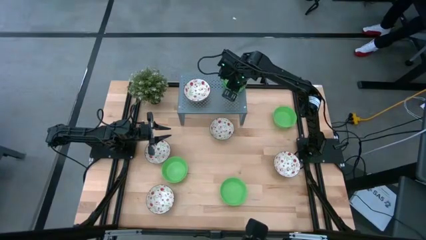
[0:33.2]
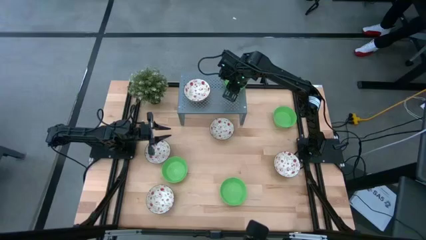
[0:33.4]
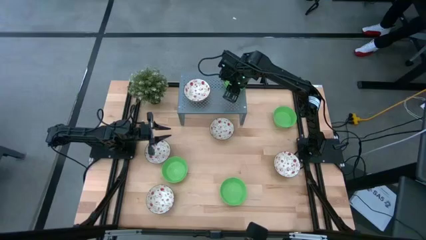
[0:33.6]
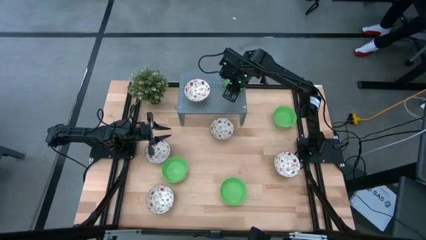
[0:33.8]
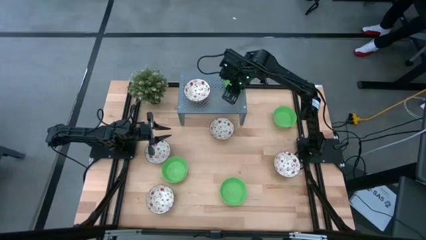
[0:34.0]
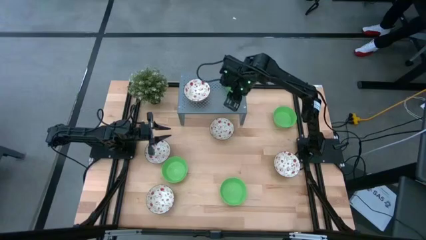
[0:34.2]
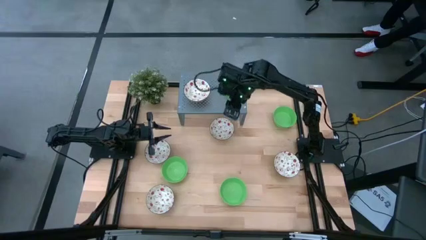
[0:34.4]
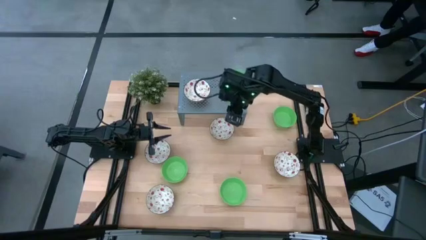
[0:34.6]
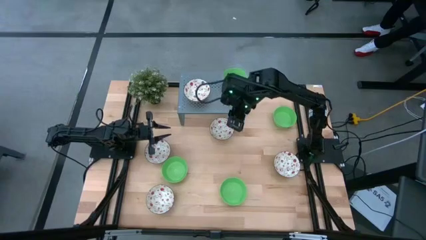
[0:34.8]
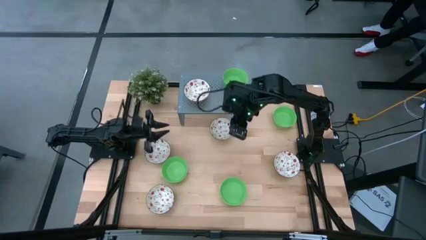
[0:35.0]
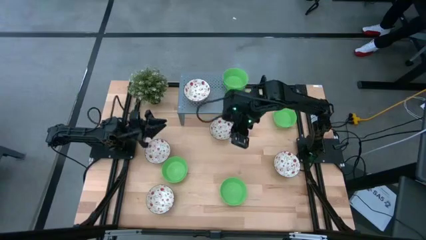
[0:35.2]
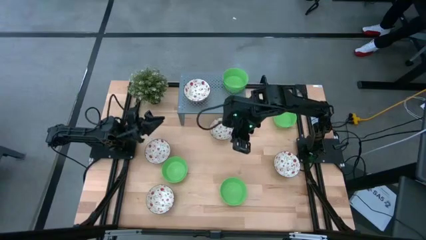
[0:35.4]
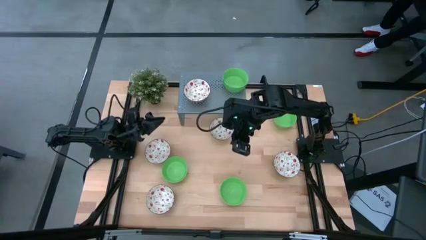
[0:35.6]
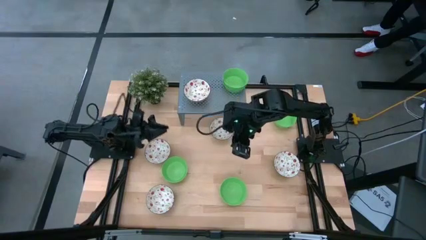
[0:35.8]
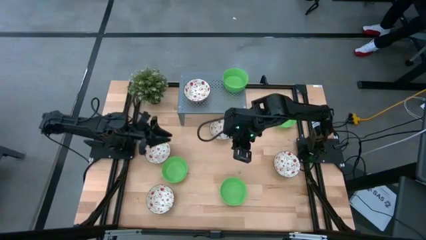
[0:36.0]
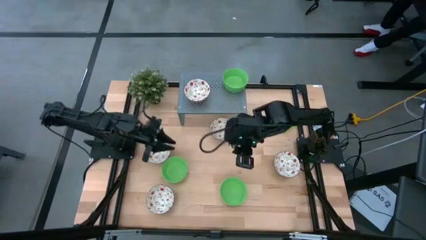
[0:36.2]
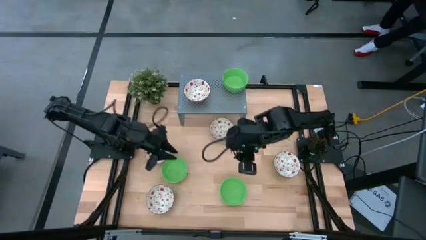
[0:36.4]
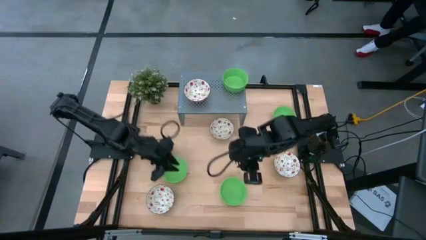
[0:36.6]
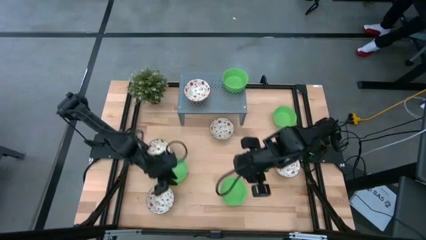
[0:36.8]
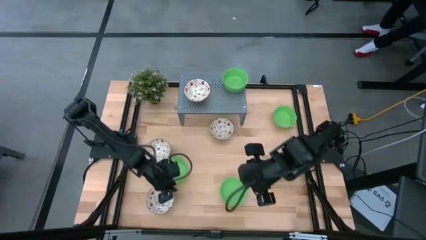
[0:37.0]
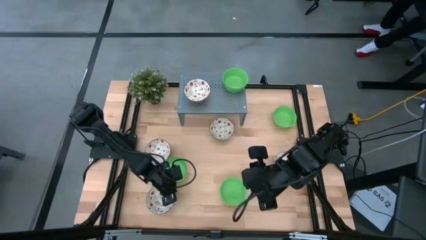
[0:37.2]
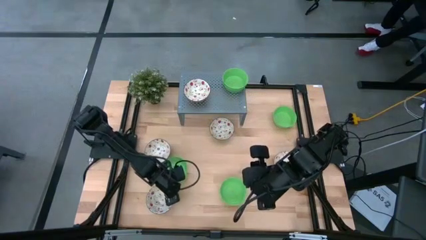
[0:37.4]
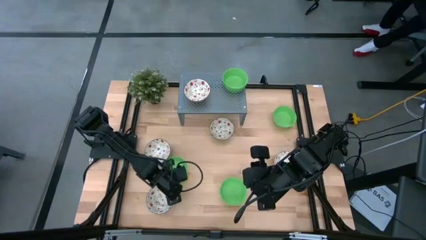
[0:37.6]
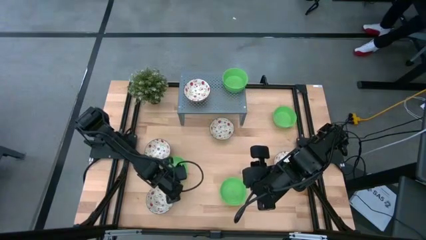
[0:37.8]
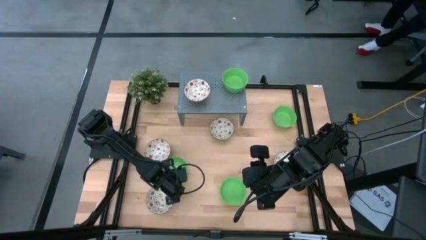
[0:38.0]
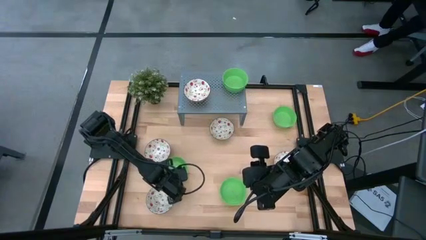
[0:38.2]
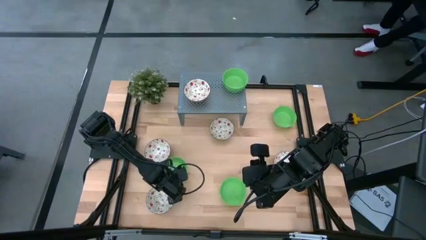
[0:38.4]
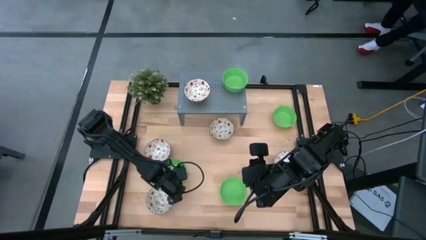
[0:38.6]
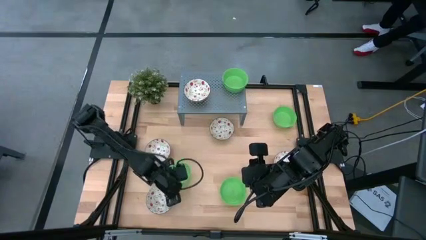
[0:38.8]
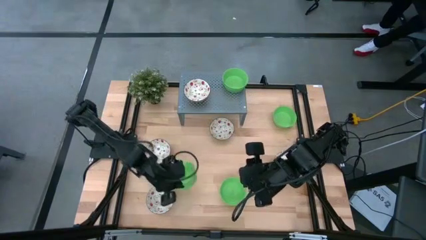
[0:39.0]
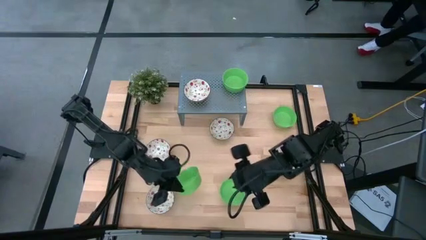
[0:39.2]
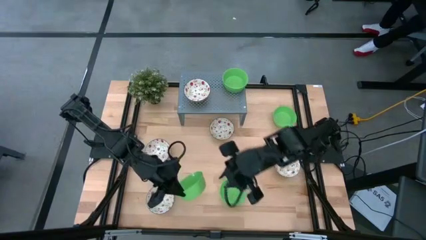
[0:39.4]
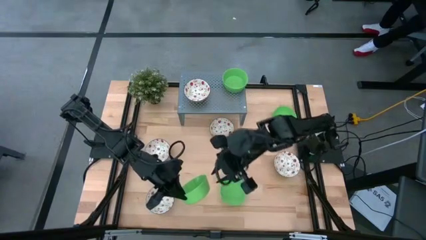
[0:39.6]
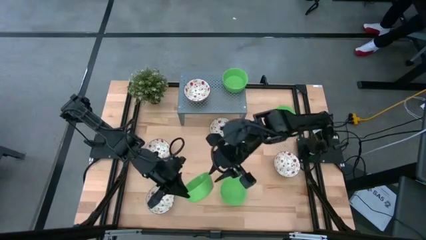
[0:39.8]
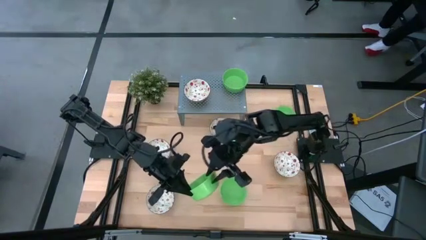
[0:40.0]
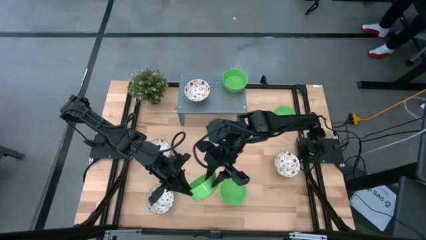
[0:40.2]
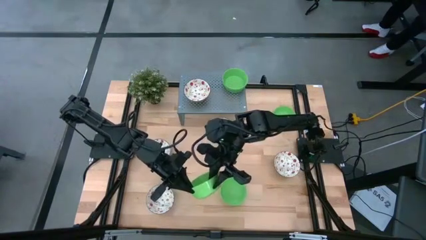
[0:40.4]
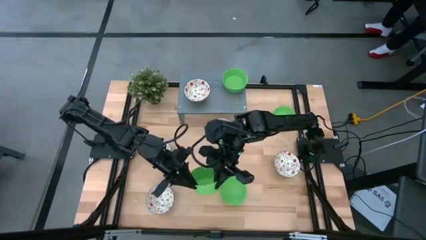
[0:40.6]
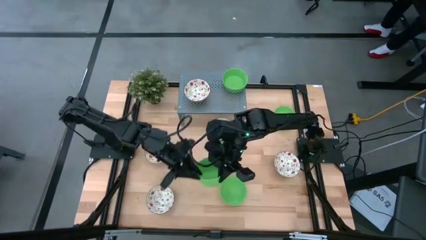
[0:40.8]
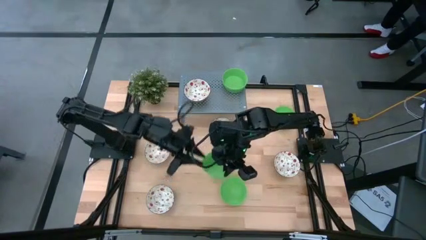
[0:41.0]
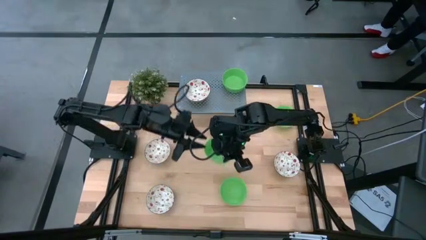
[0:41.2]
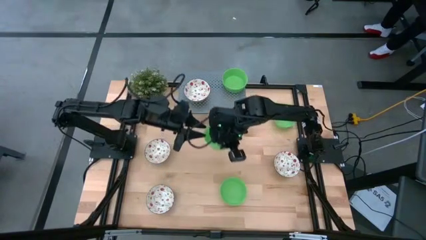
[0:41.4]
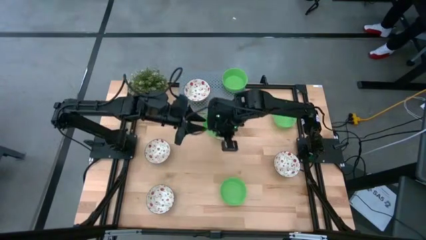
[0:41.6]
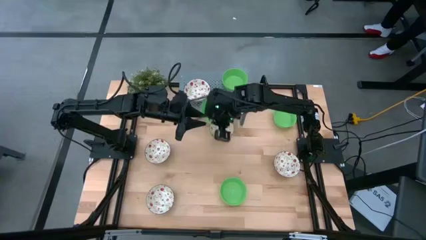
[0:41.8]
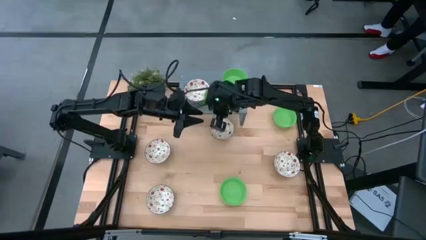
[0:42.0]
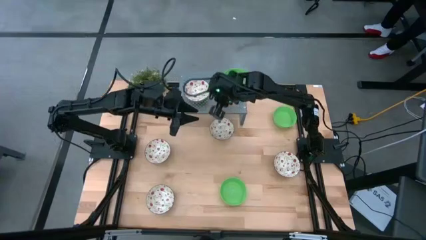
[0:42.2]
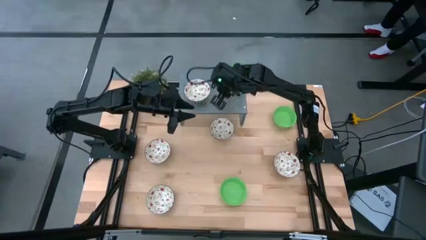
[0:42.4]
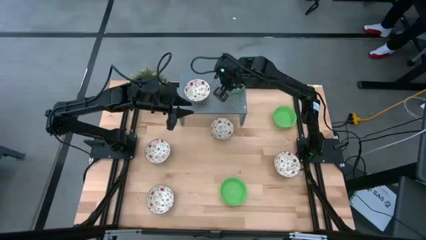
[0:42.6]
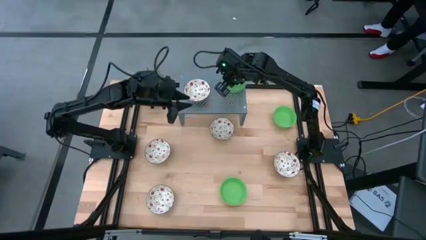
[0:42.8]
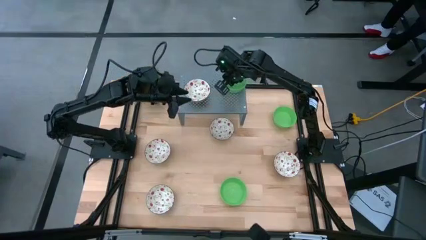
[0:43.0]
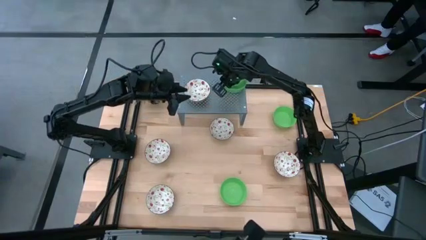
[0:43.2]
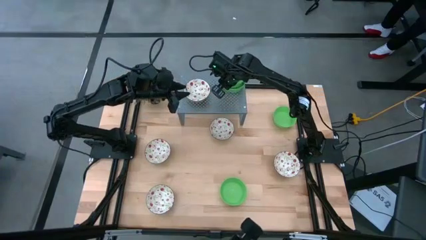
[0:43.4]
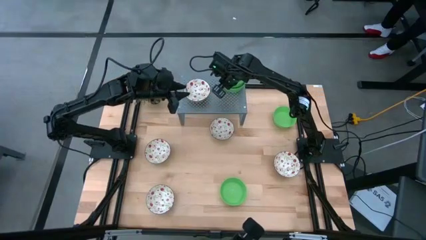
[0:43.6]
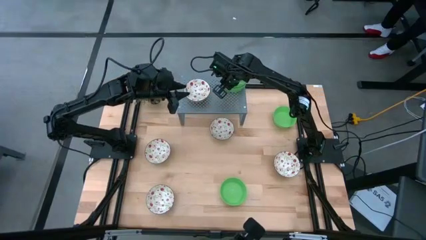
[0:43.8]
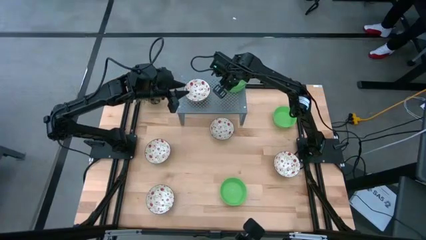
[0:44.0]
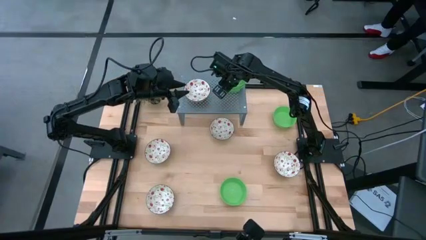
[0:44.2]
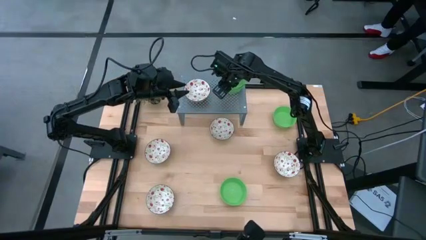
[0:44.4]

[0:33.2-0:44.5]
Task: Pick & Place Mini bowls
Stack the green bowl on the green bowl

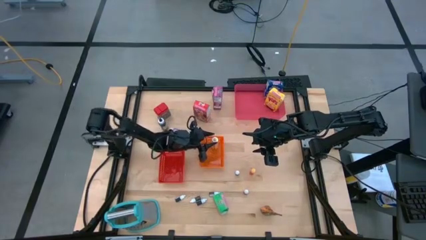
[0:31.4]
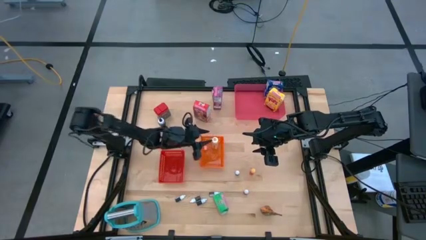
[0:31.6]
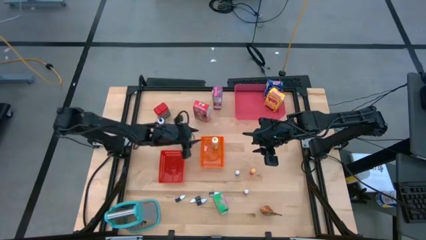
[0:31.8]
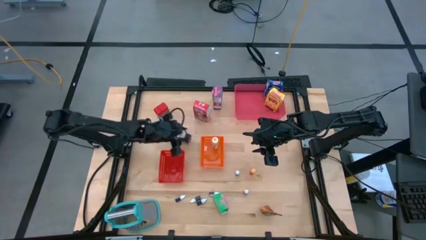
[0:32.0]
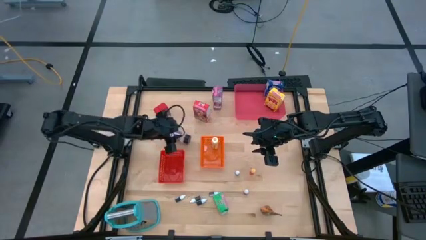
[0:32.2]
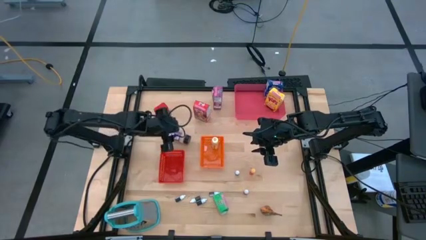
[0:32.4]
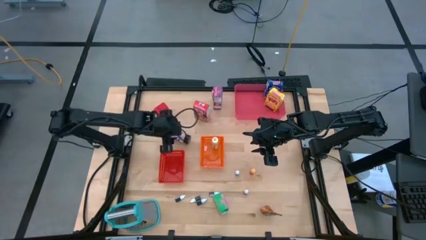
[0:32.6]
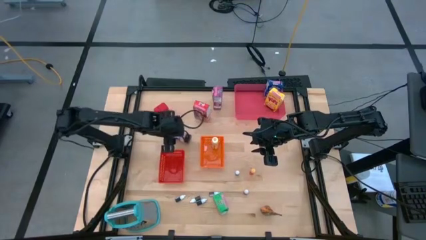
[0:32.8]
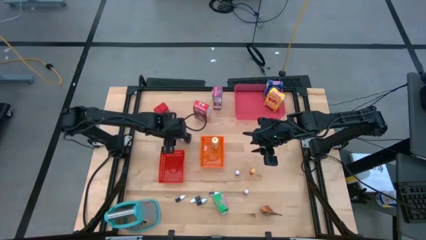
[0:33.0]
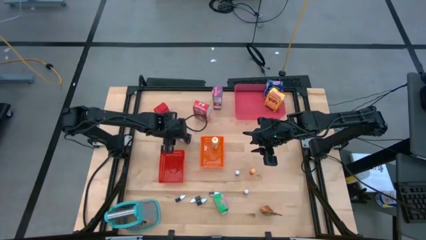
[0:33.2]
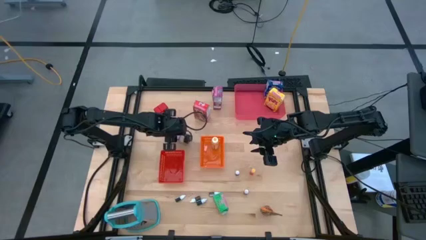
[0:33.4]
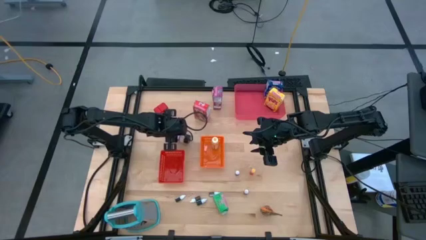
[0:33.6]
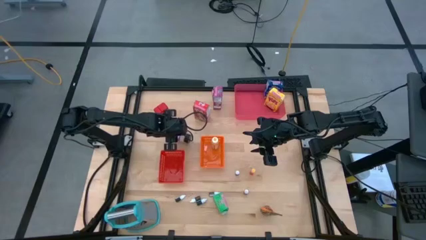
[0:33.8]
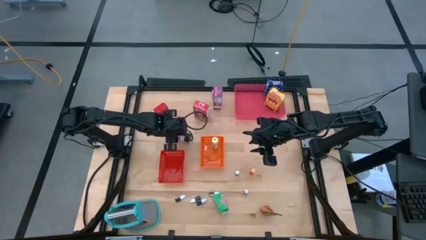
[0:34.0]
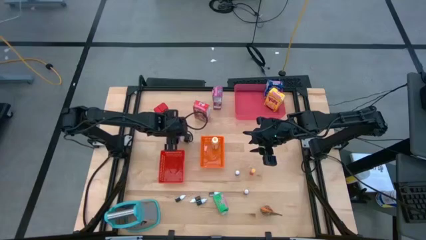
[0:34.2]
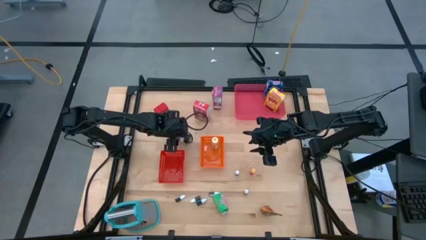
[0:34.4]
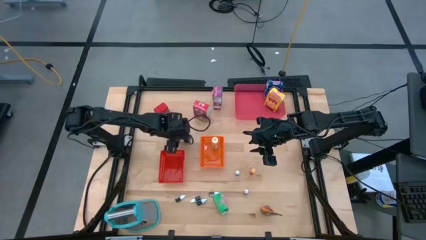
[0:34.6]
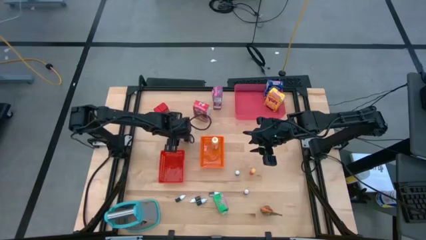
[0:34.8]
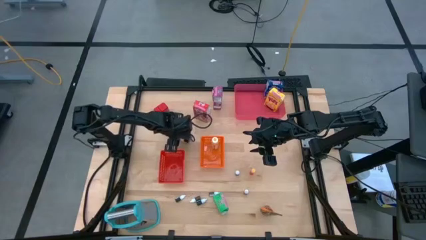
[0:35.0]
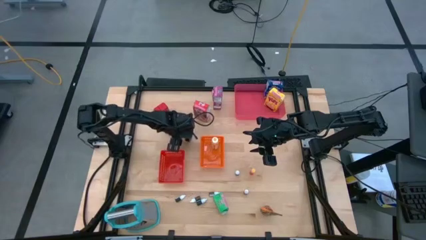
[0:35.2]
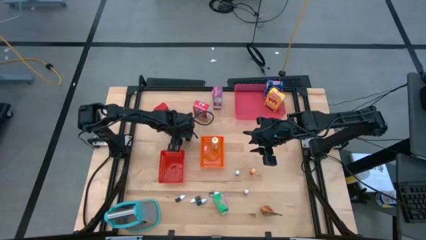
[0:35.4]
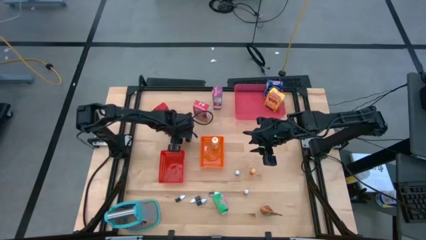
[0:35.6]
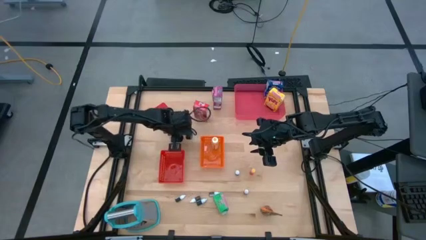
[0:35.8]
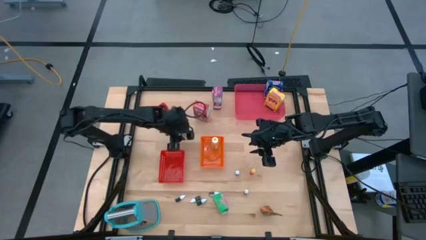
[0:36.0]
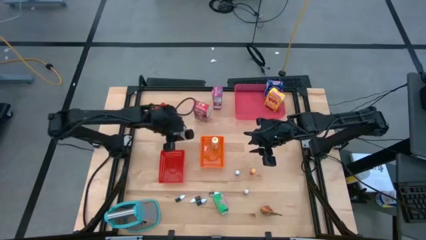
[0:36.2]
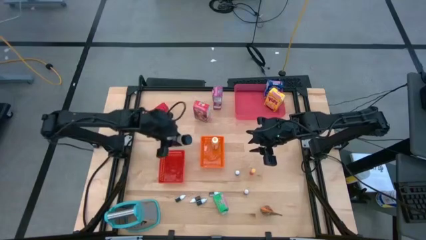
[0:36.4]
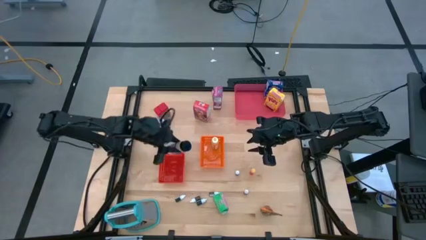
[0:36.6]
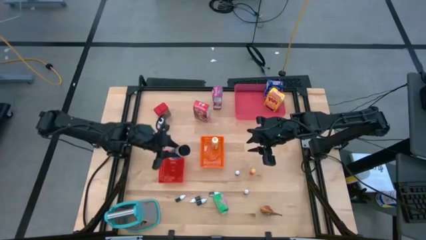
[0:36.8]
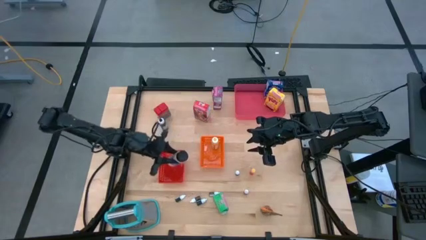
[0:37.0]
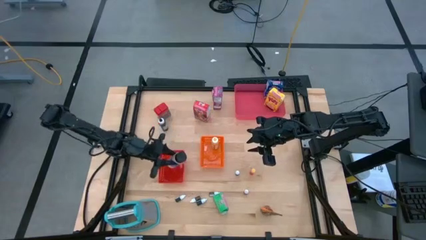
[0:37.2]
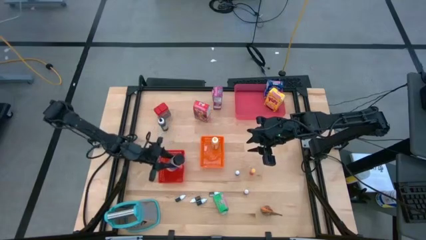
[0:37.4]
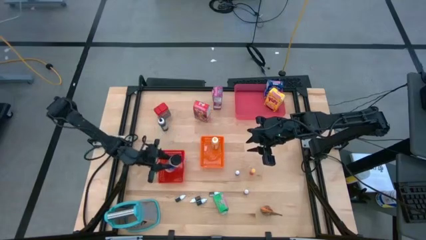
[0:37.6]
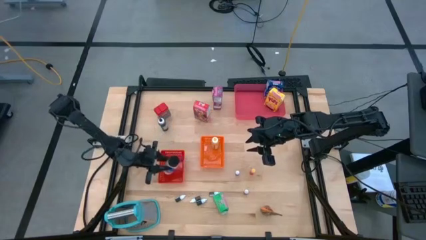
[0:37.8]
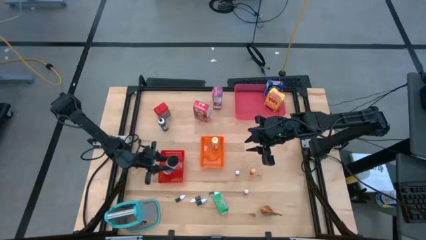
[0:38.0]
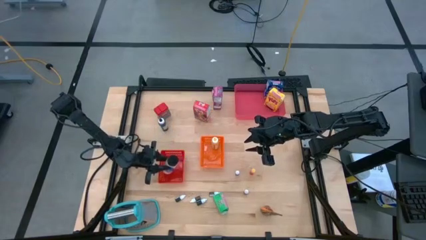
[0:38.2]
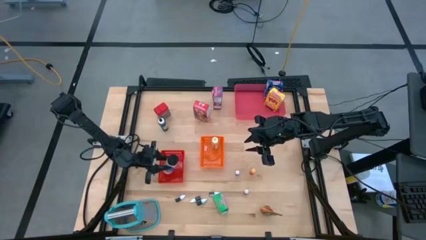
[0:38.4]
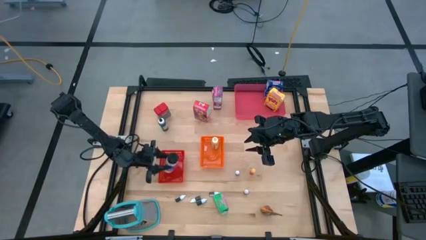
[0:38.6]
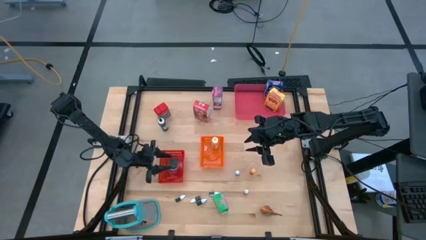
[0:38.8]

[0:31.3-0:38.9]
Task: Pick & Place Kitchen Items
Put the black seasoning bottle into the red bin
